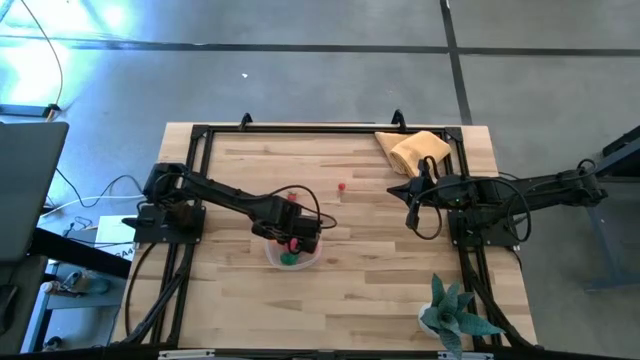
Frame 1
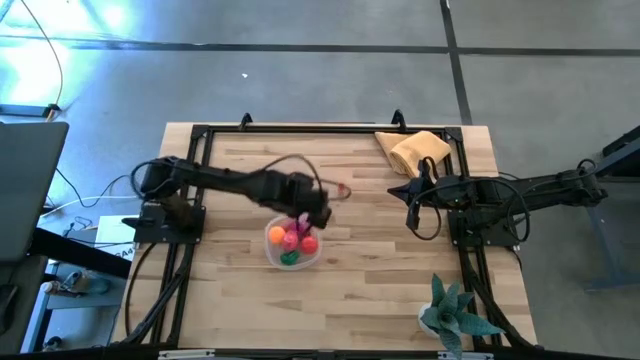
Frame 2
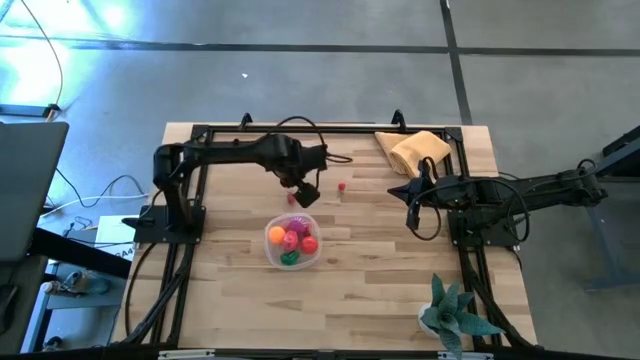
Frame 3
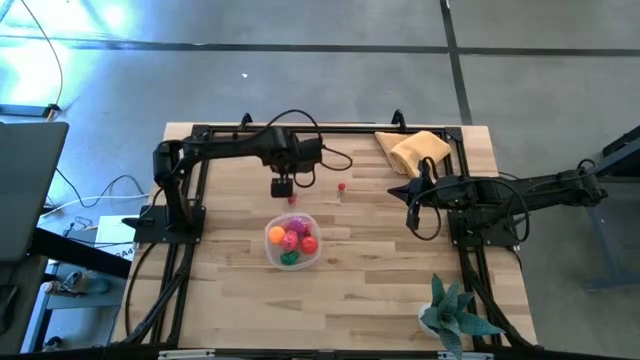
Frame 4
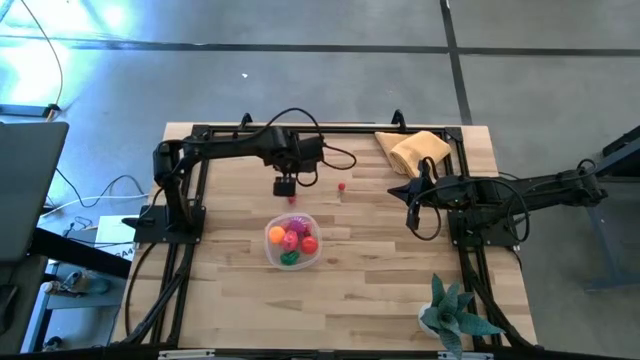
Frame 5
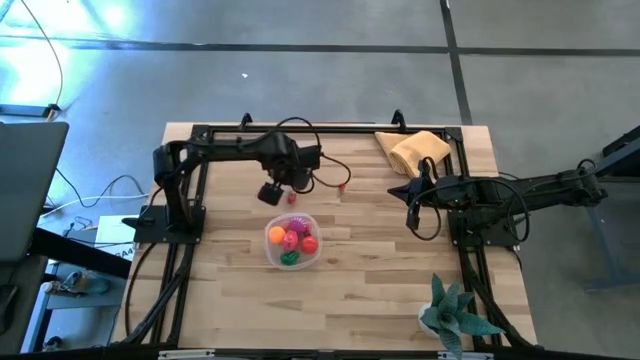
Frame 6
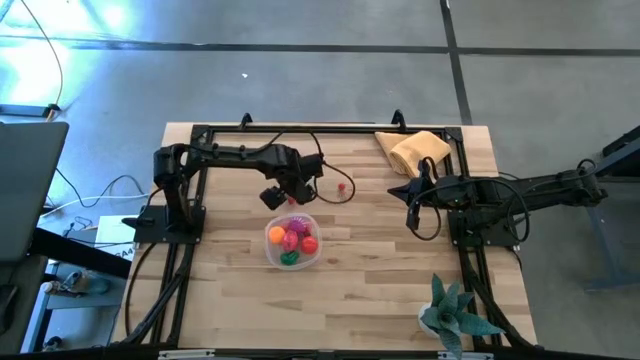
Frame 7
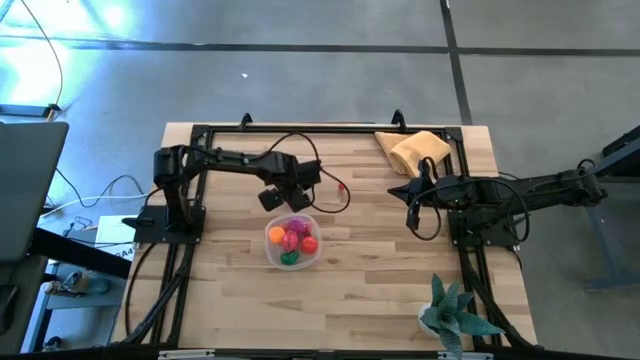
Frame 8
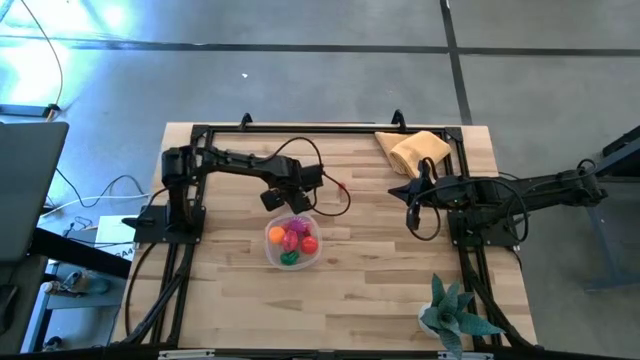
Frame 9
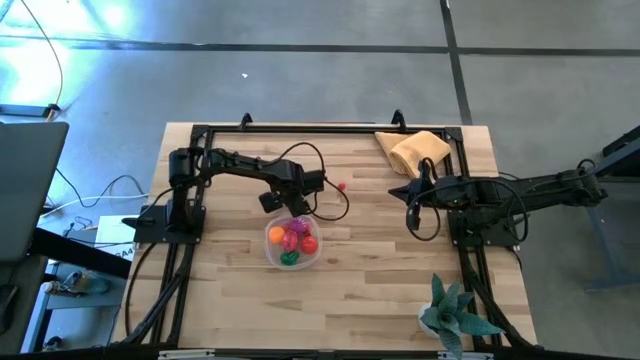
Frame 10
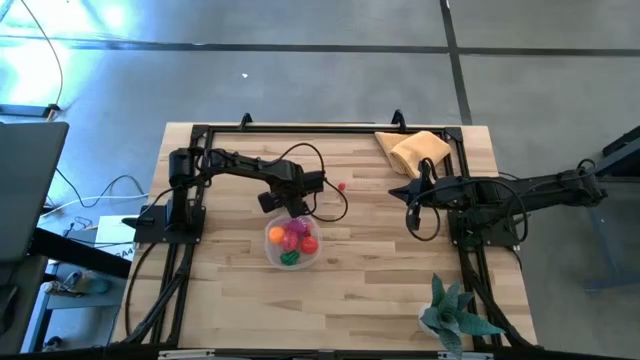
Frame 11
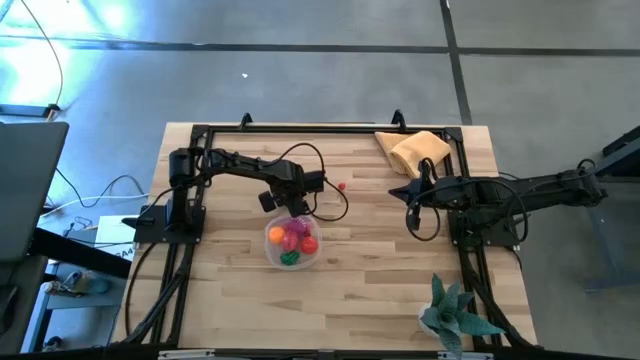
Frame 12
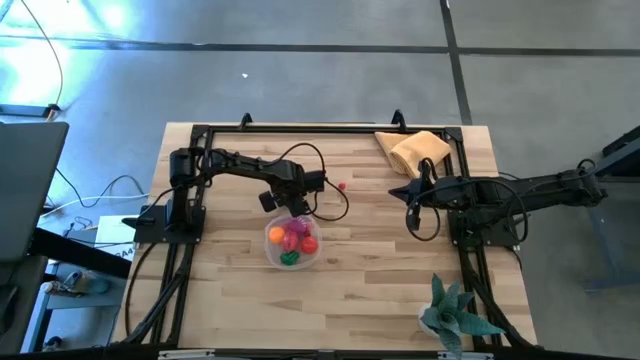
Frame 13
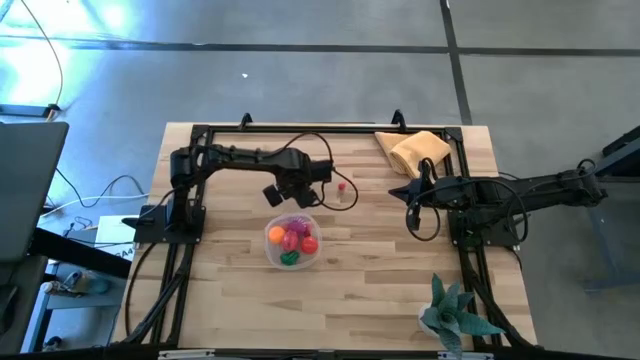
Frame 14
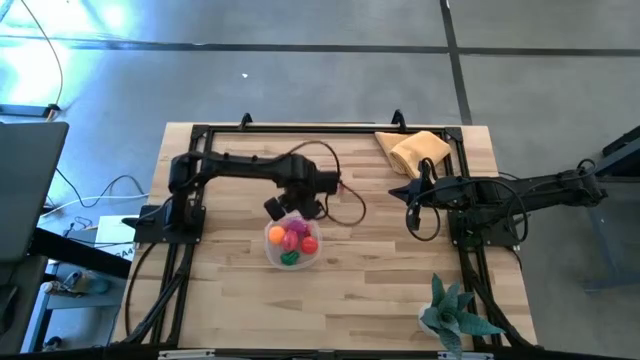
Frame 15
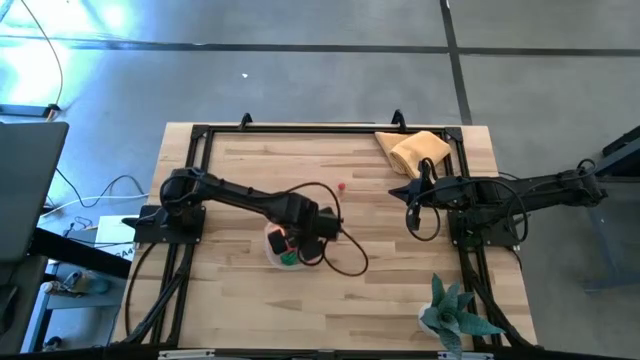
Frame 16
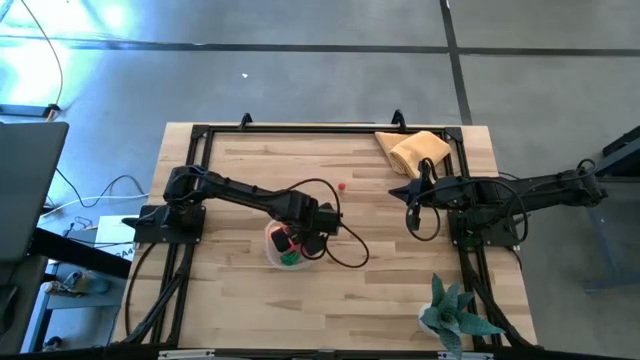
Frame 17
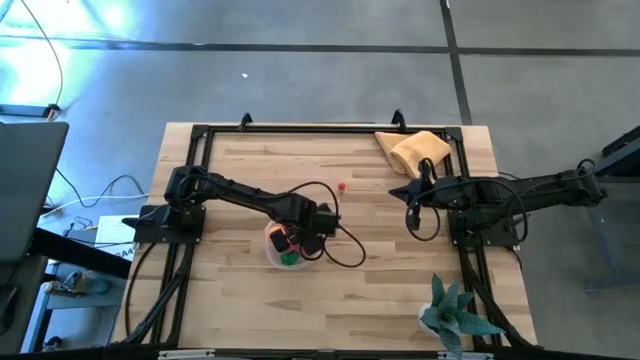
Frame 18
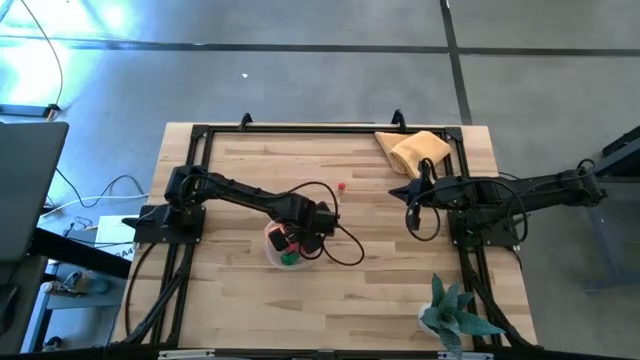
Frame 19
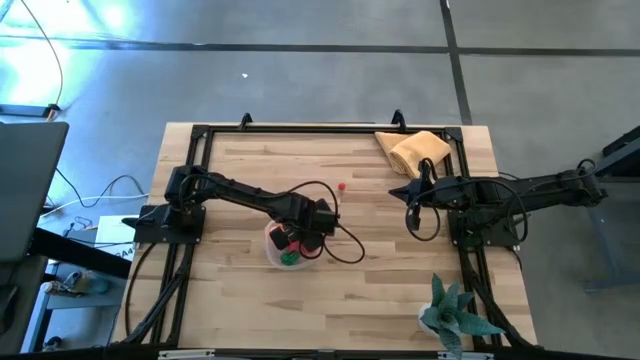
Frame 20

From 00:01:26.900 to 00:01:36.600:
Task: Pick and placing Produce into tupperware
Put the strawberry into the transparent container

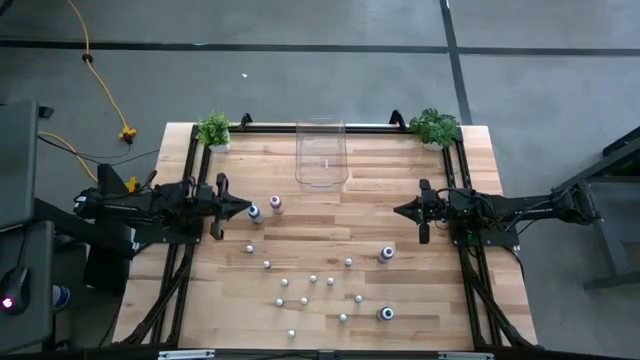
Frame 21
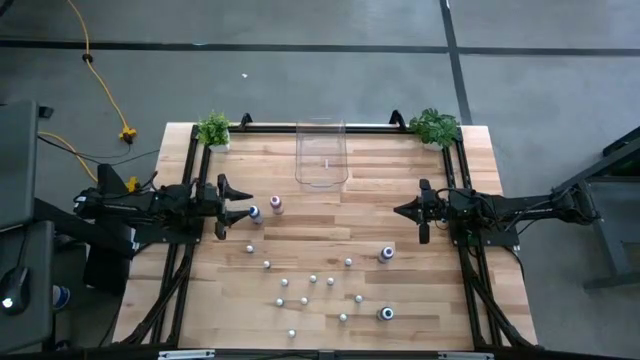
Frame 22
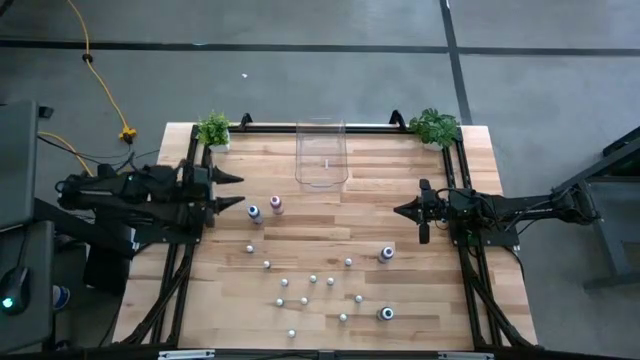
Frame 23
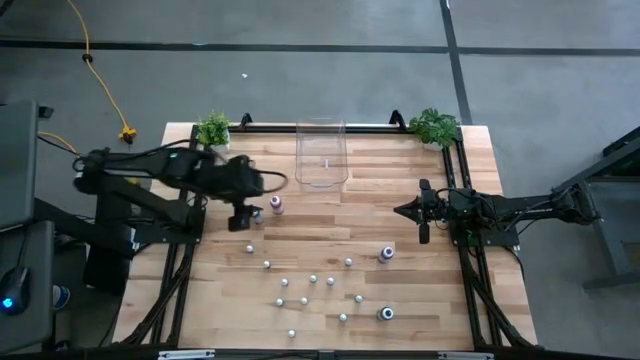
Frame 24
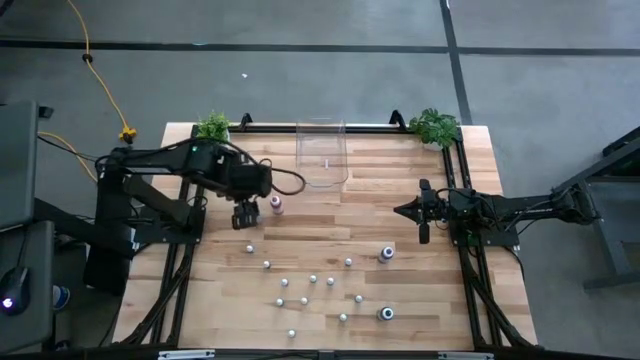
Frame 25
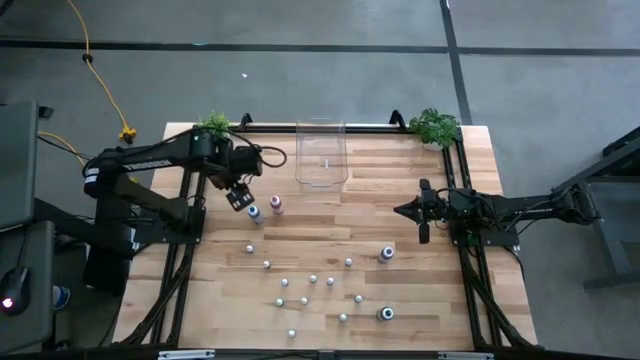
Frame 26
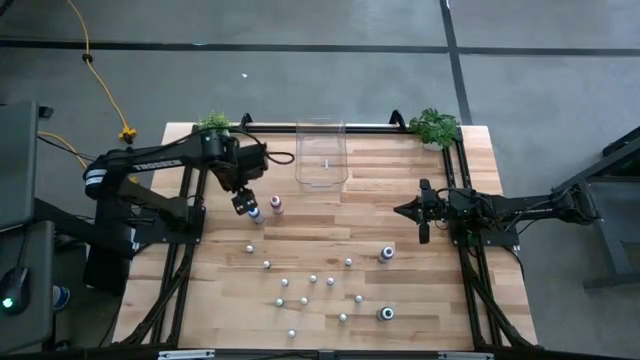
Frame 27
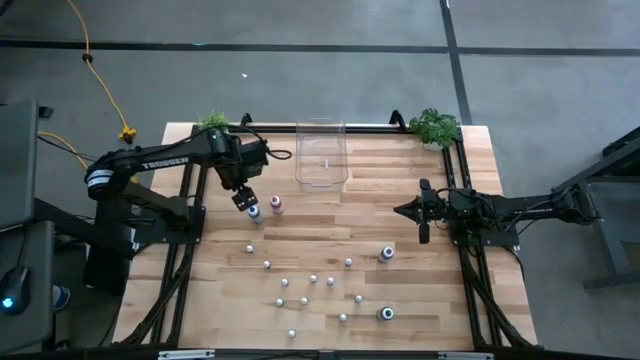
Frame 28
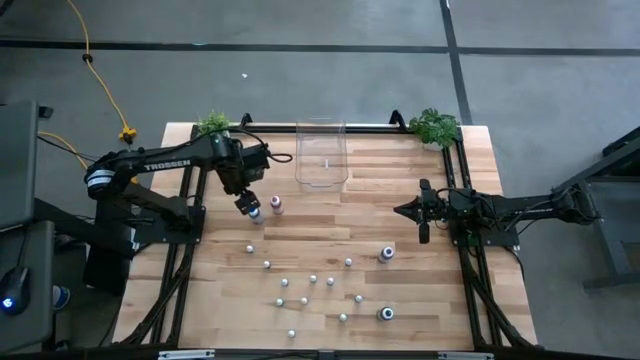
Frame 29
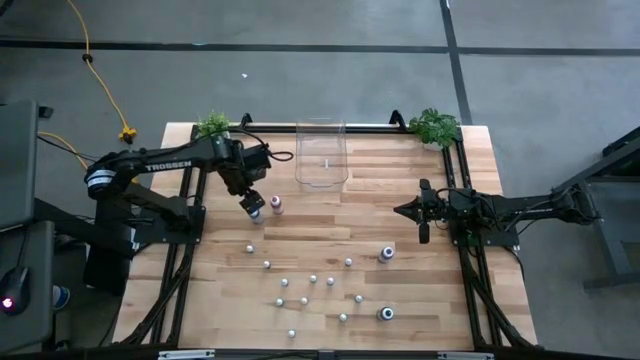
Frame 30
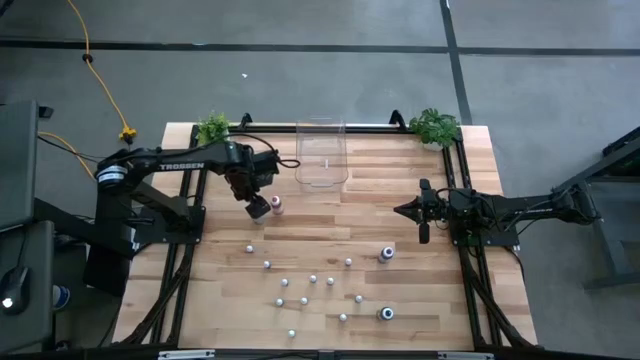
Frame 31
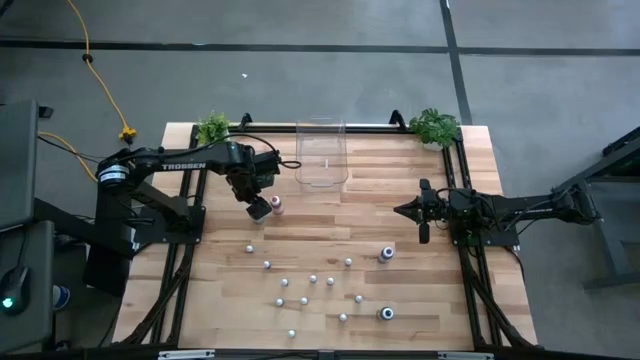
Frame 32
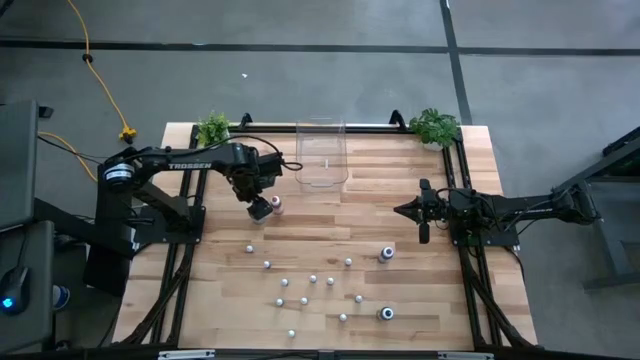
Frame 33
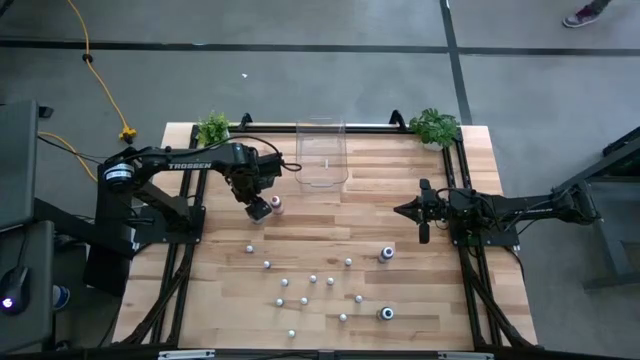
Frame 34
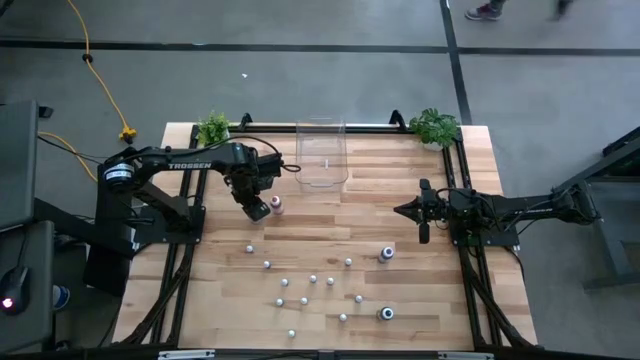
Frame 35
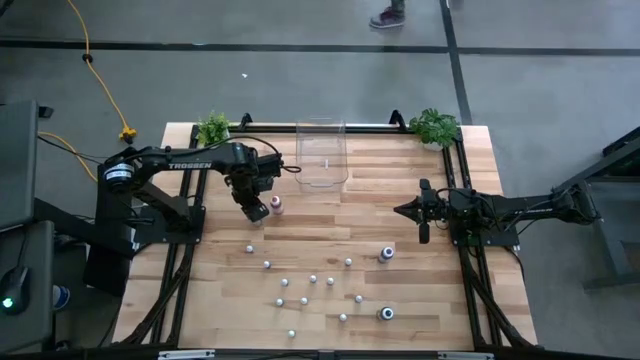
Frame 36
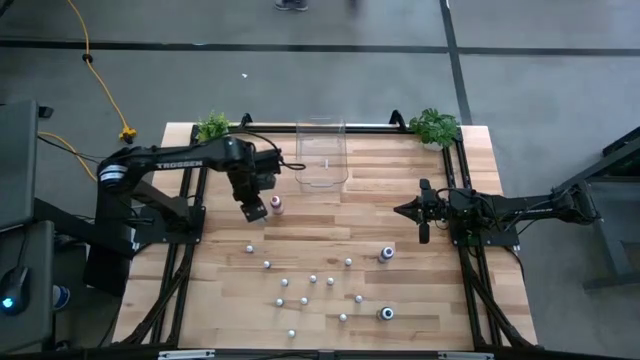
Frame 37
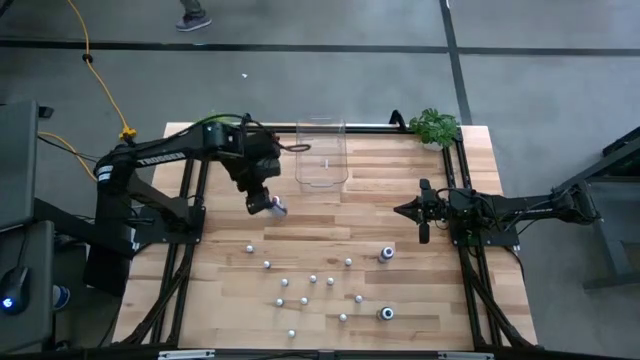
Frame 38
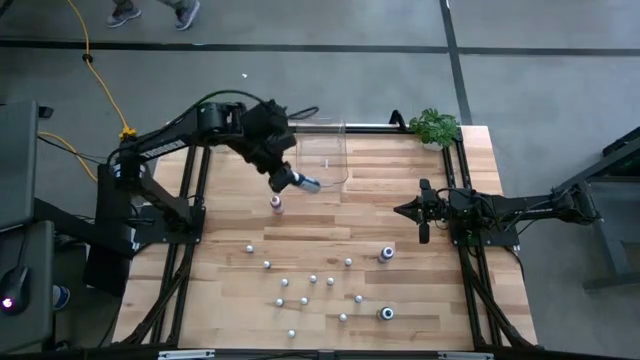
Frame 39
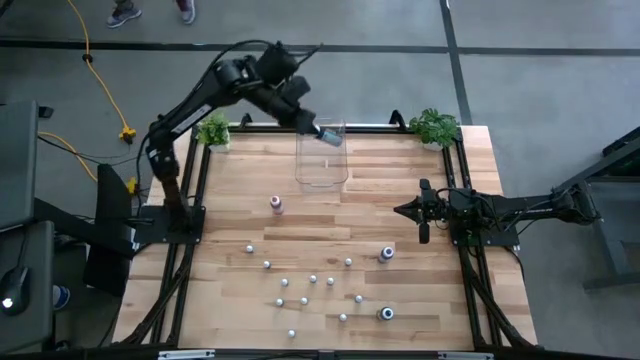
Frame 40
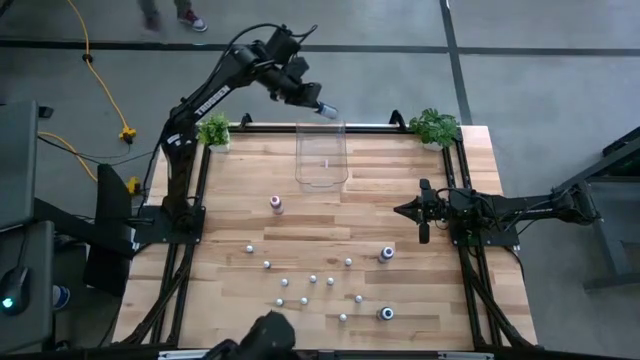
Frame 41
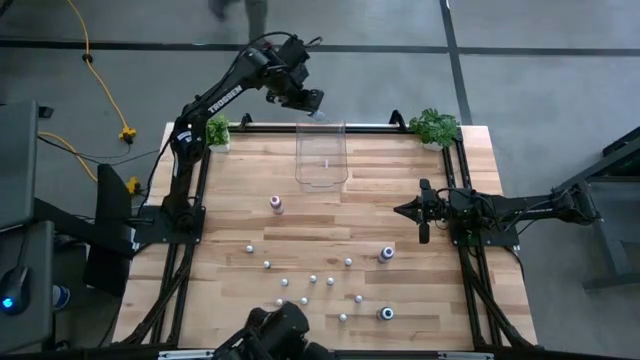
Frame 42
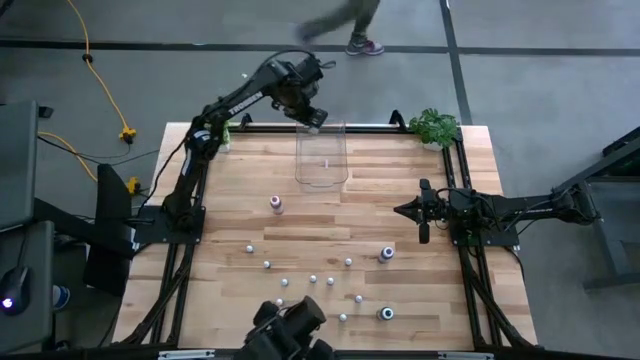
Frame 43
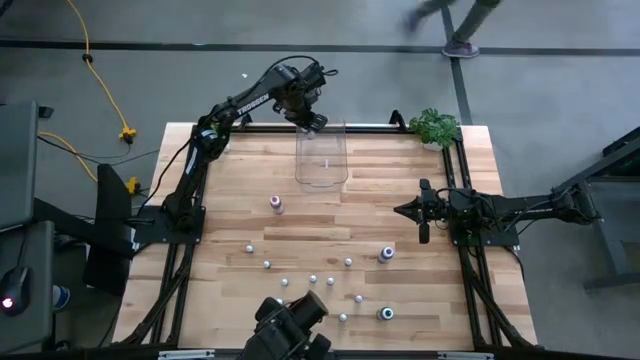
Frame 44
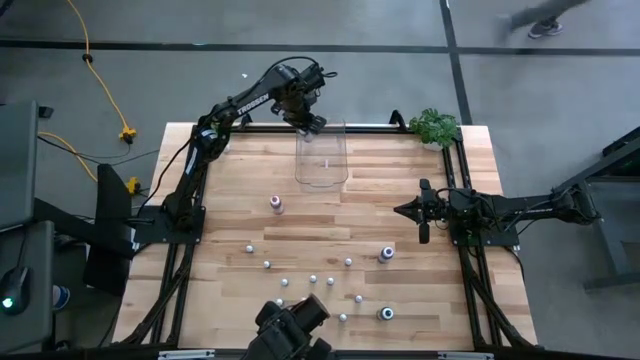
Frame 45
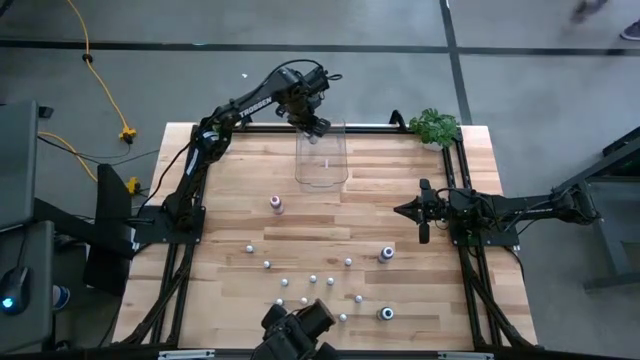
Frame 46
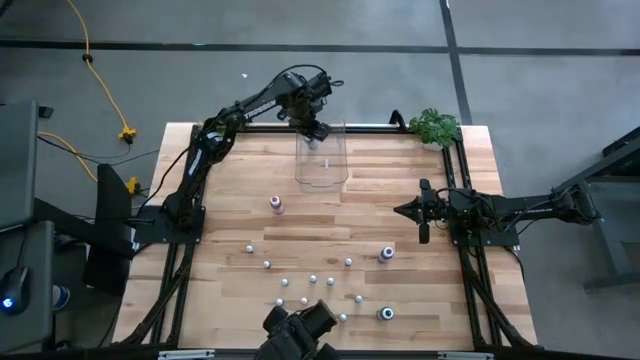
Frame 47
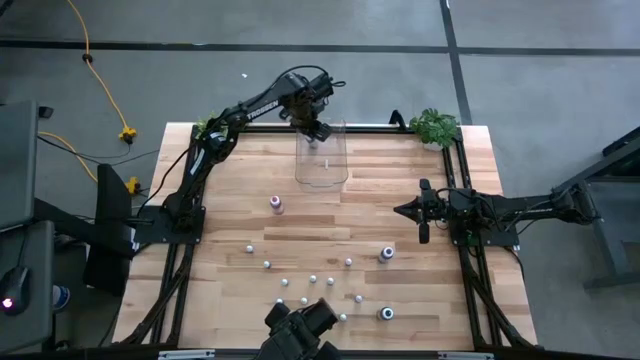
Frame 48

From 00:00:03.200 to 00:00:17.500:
Task: Pick & Place food coloring
Put the large blue food coloring into the transparent bin
